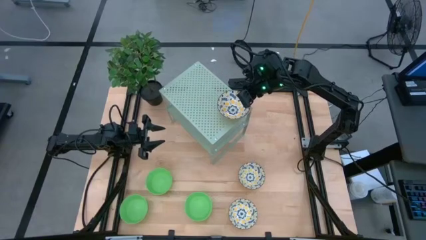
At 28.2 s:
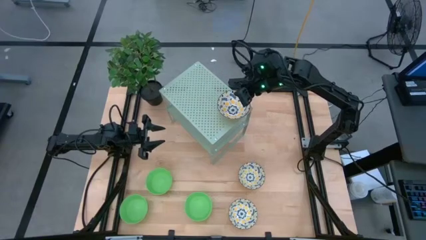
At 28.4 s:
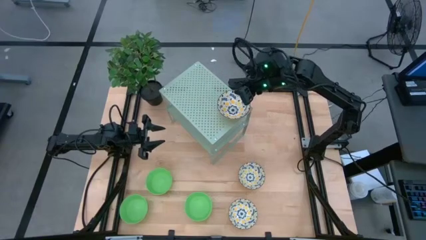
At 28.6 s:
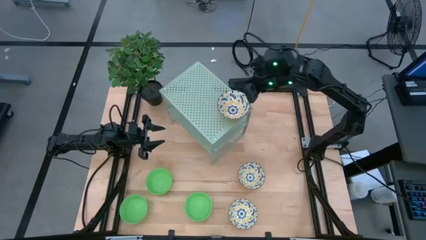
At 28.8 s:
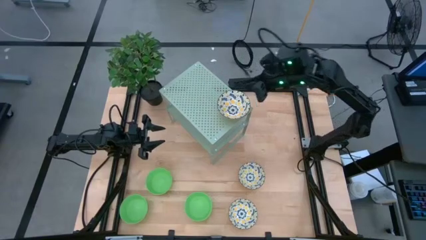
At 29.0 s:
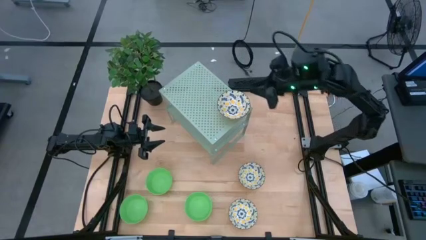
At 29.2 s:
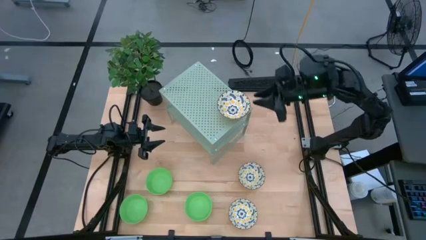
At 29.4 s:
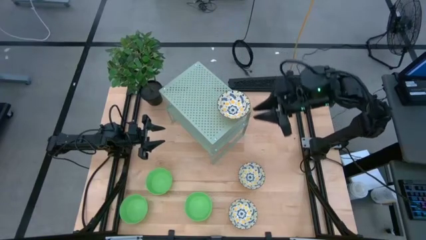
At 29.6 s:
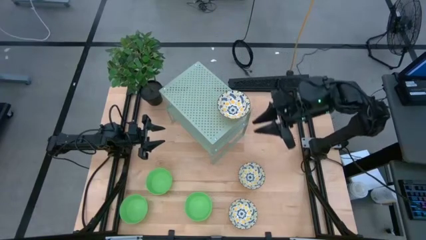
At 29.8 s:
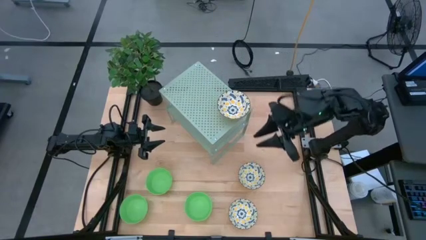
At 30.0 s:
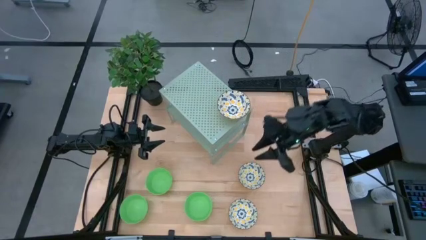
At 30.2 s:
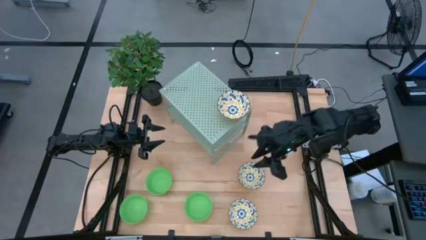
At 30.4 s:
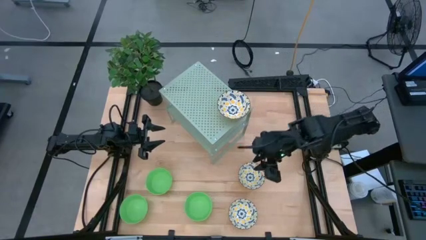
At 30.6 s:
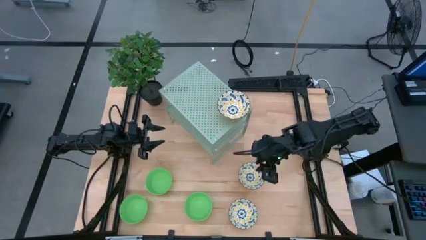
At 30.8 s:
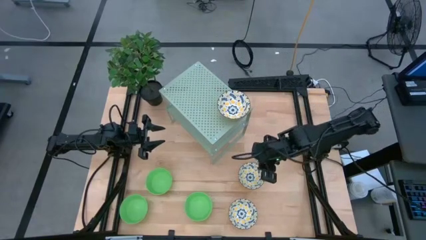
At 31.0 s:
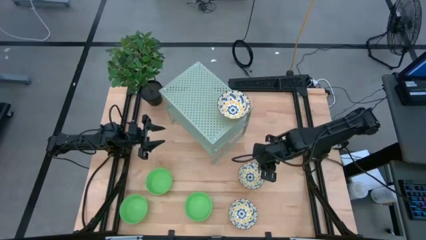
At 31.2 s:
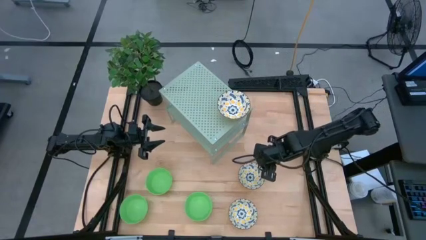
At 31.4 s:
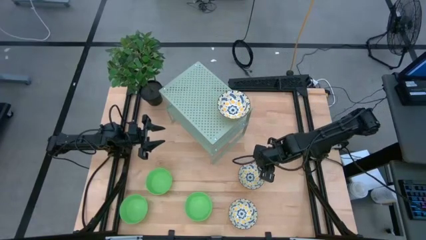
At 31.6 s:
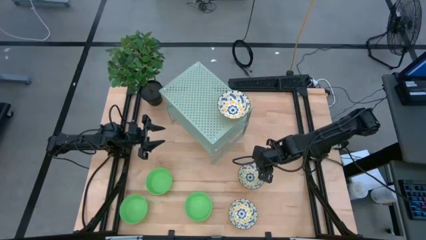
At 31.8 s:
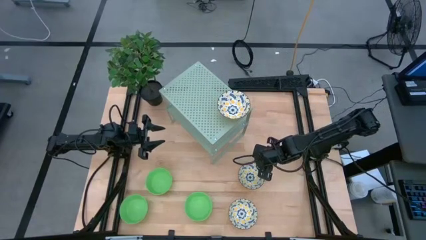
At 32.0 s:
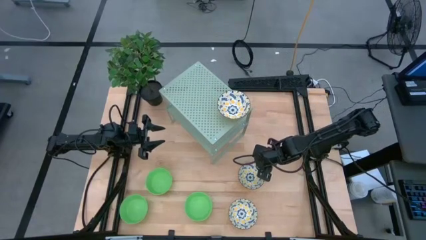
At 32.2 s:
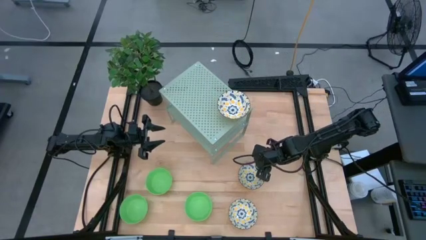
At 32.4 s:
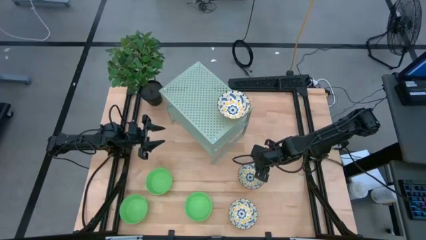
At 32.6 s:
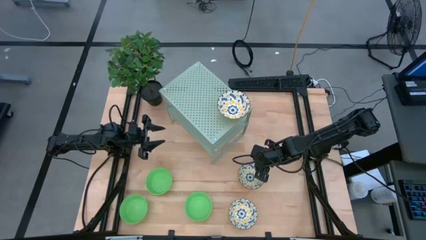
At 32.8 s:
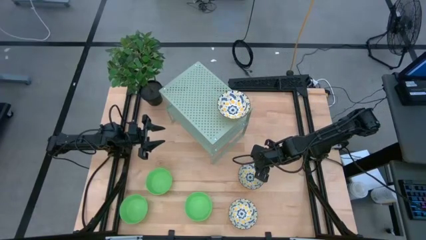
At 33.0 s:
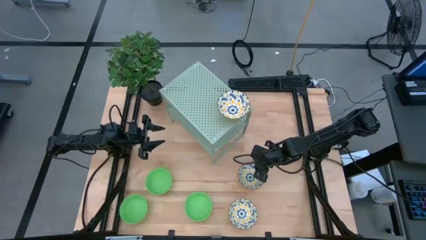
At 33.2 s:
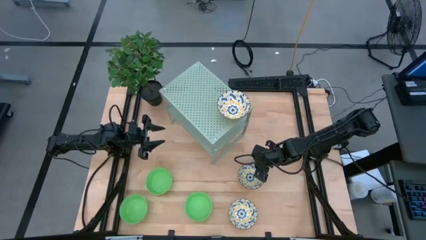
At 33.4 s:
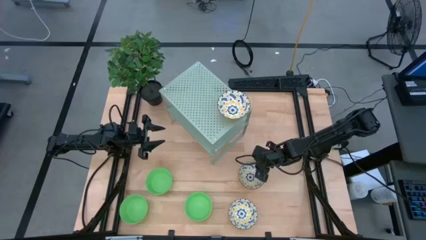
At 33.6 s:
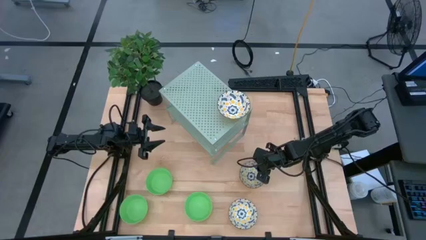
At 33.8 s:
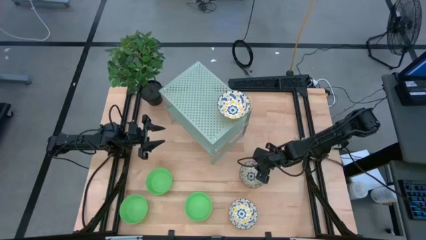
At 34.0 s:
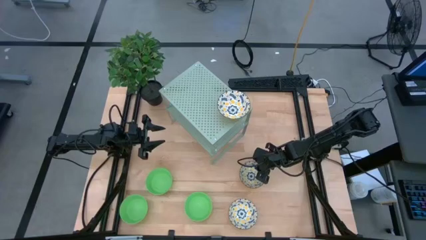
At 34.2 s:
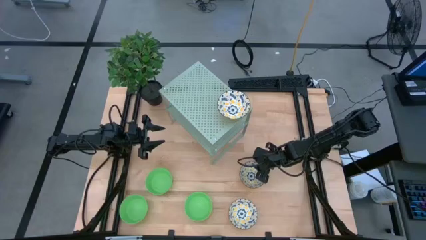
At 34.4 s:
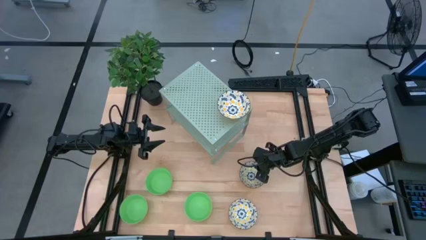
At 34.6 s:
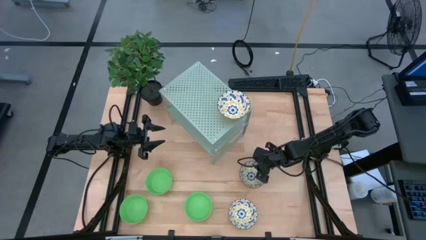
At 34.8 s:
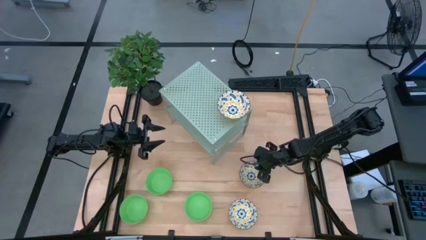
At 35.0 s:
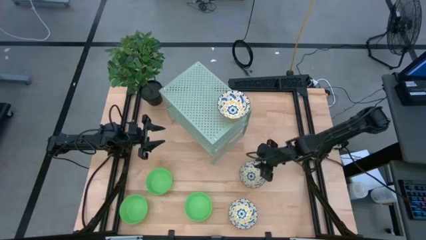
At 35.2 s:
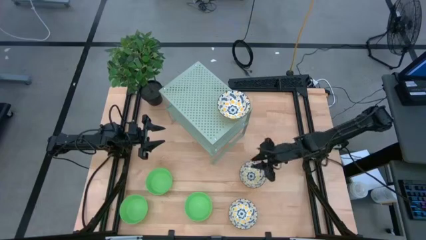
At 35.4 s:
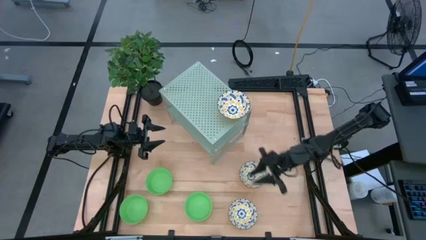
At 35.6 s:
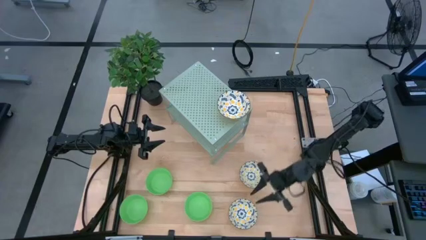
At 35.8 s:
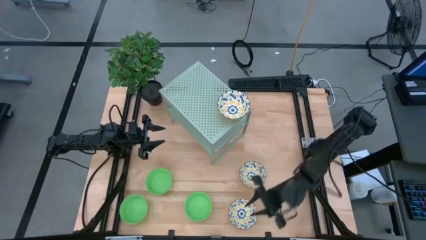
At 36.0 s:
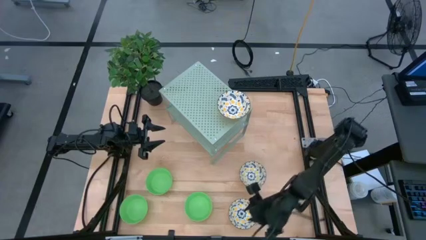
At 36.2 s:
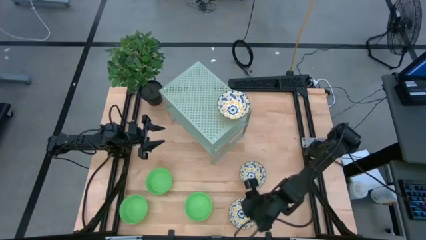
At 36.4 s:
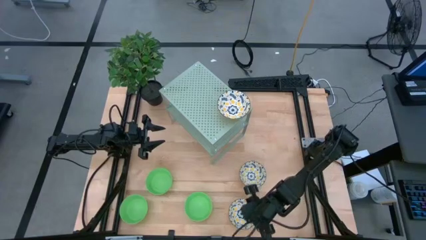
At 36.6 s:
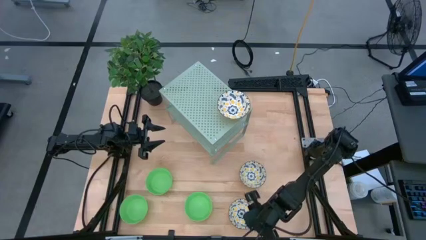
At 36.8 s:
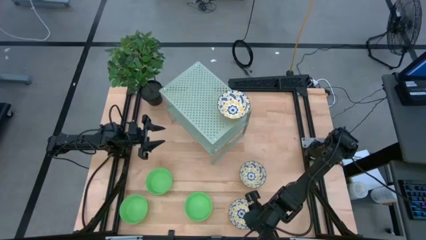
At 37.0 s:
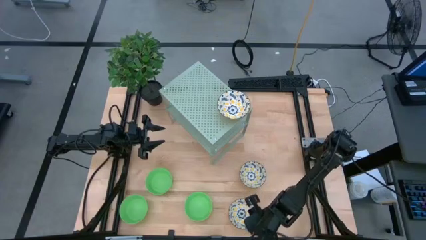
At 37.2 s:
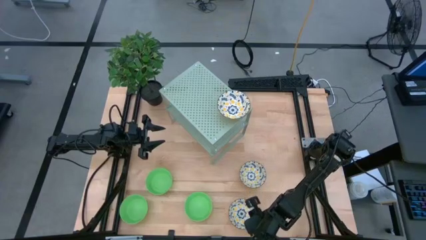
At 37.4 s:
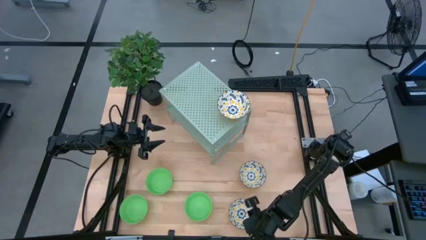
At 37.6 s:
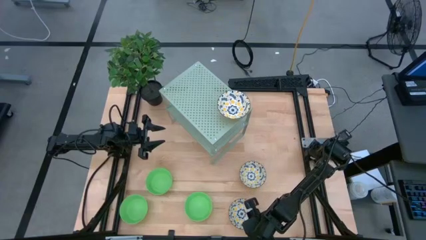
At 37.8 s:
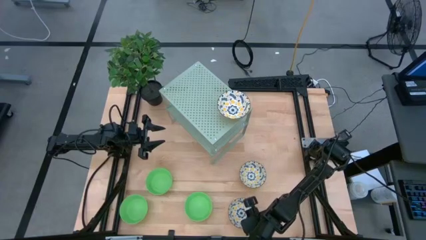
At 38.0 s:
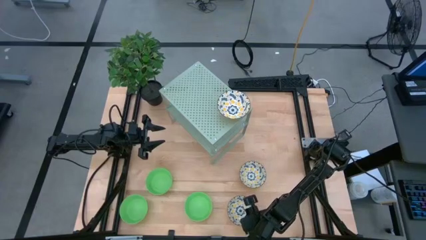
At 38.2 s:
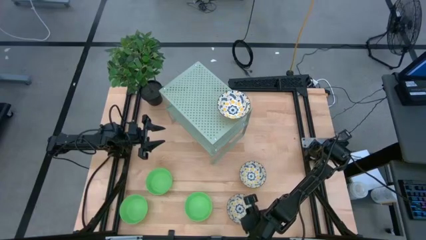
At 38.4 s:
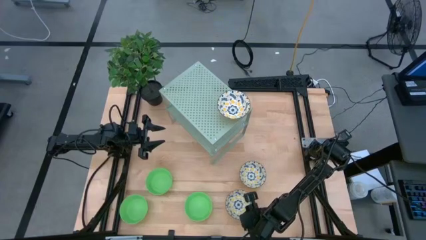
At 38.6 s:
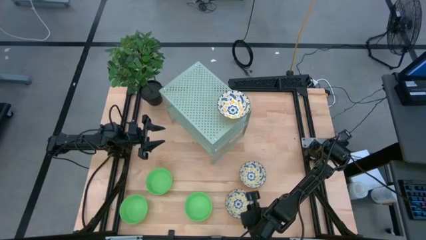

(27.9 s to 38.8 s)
Task: Pick & Place Mini bowls
Stack the bottom yellow patterned bowl on the yellow patterned bowl on the shelf

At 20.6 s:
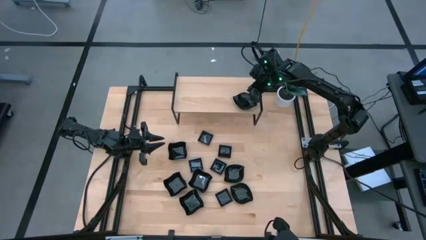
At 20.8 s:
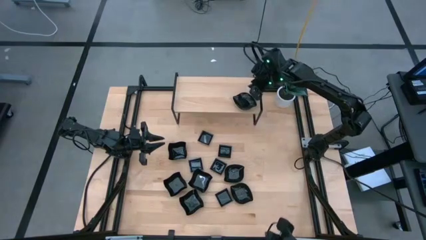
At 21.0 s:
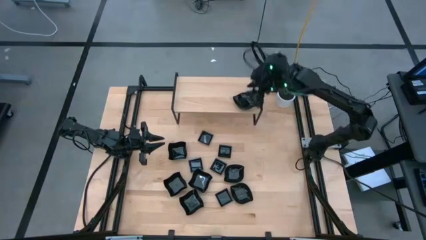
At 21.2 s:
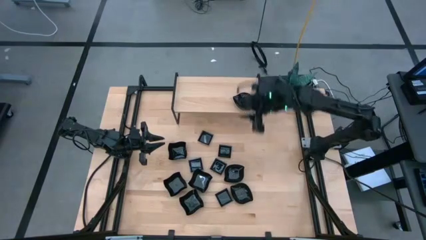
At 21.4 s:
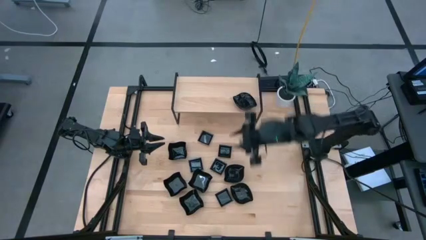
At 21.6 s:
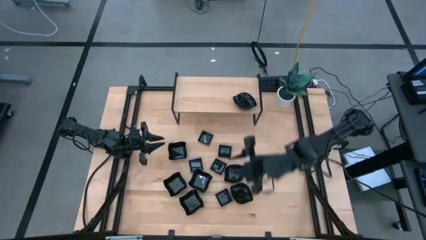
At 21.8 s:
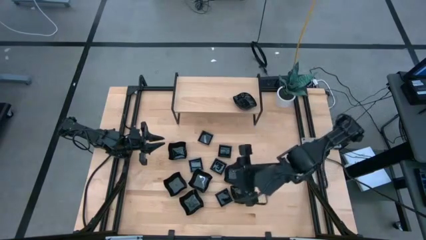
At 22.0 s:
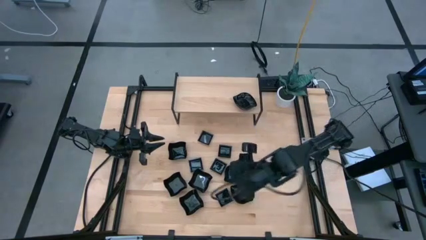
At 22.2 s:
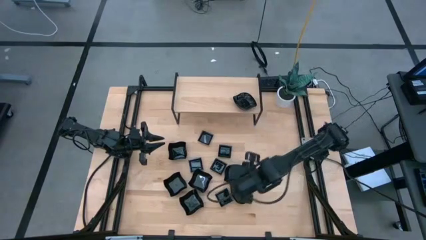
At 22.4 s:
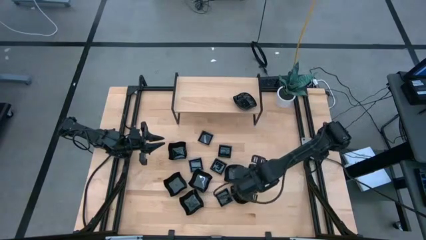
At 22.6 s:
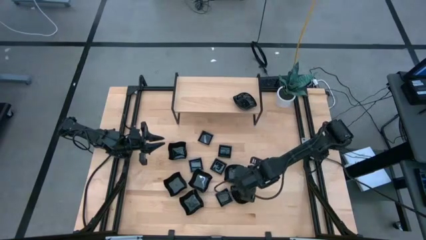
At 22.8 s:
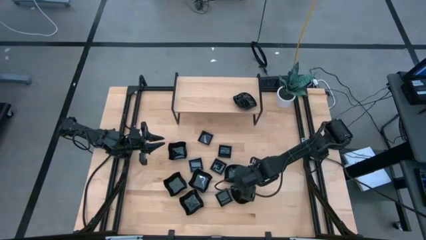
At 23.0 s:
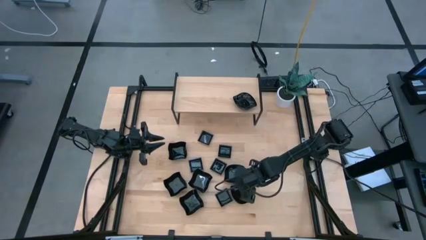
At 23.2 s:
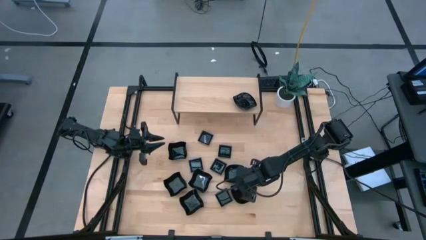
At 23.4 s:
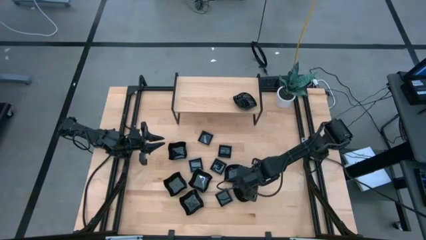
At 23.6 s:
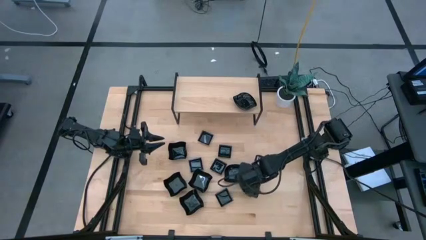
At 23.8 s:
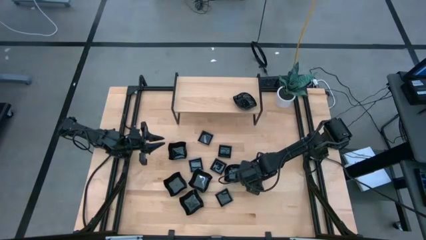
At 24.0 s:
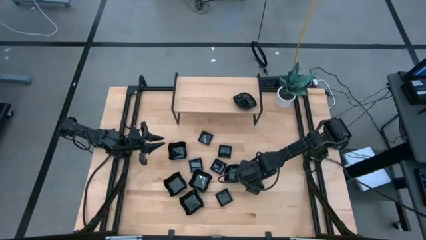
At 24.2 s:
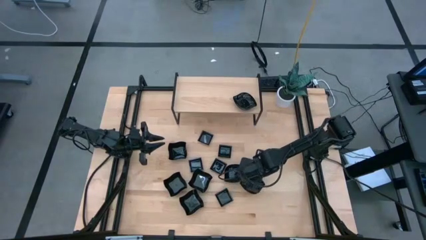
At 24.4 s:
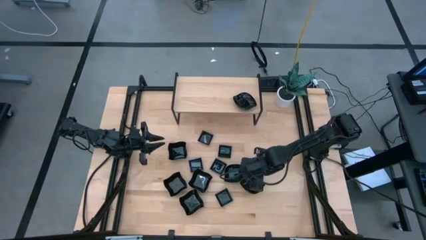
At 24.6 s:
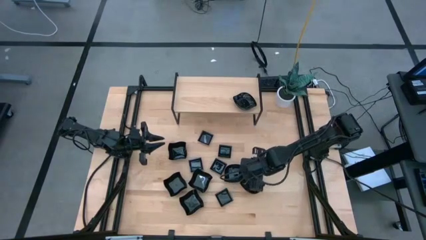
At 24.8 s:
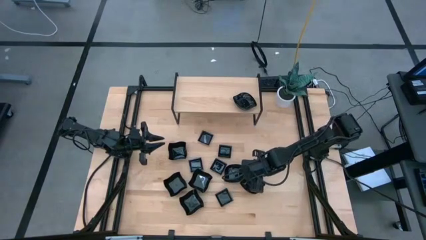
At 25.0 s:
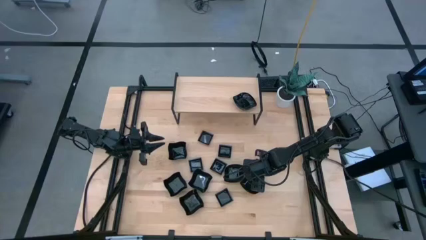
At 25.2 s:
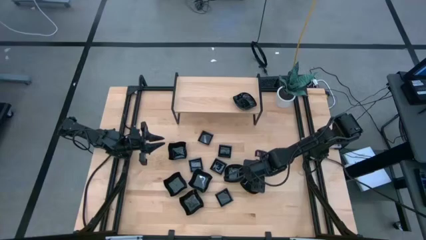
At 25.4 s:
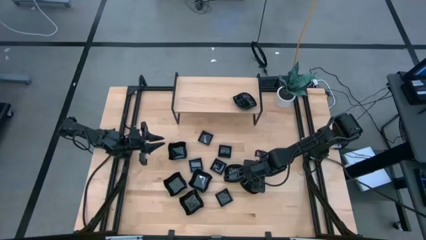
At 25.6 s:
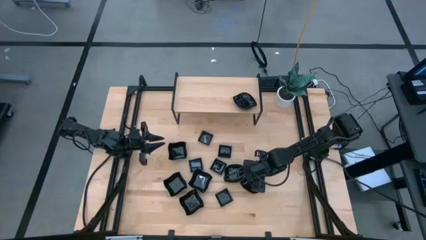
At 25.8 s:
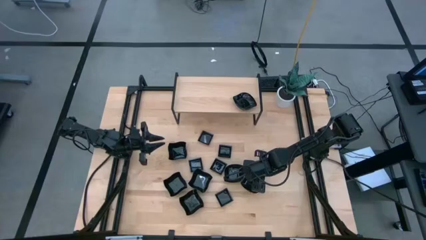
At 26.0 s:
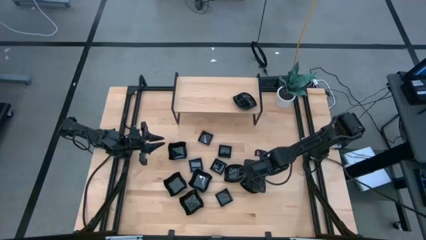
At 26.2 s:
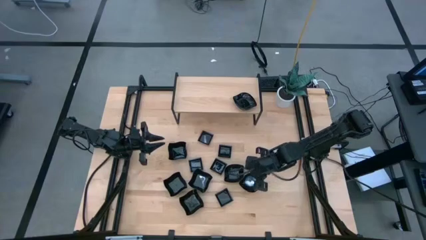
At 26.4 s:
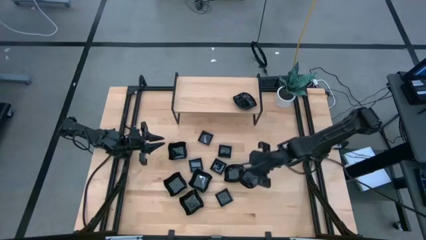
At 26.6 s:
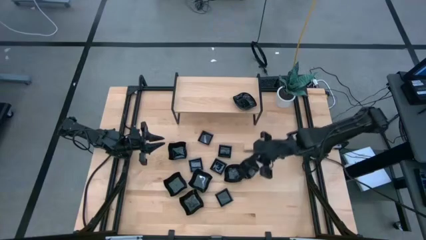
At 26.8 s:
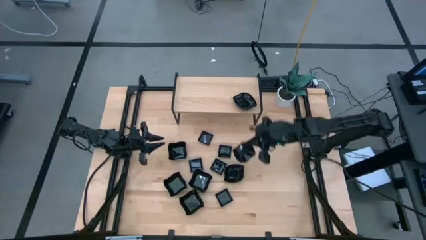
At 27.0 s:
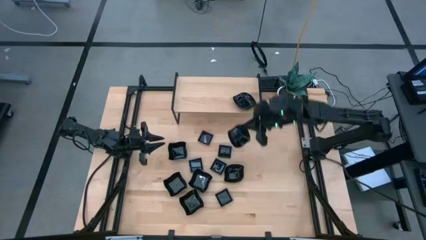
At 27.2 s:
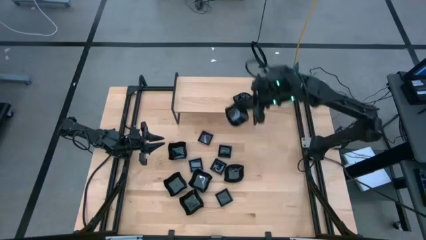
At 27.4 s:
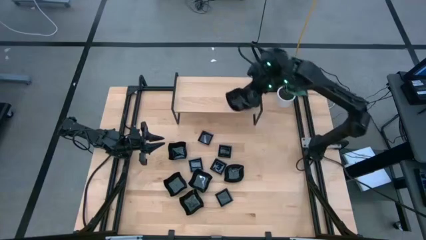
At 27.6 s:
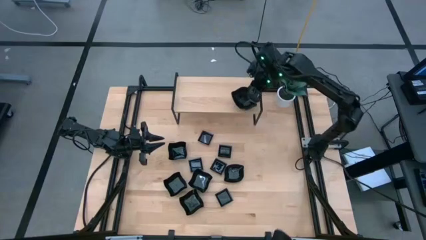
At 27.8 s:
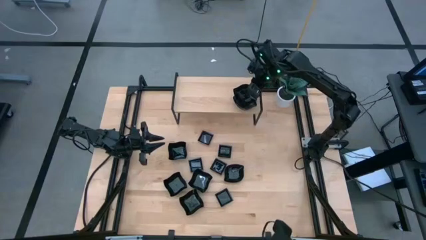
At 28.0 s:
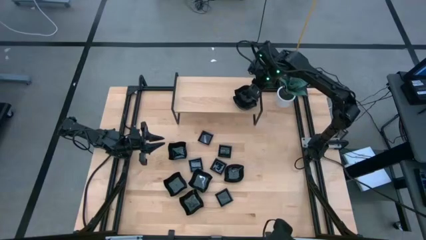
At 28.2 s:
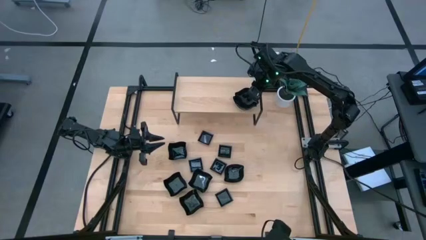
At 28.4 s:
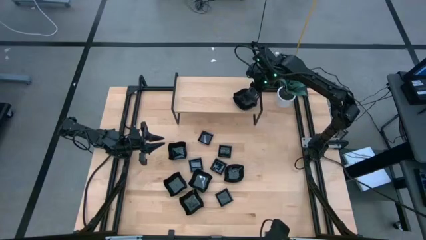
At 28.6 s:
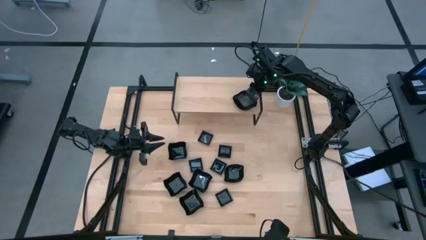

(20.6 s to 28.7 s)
Task: Pick & Place Mini shaped plates
Stack the top leaf-shaped plate on top of the other leaf-shaped plates on the shelf
